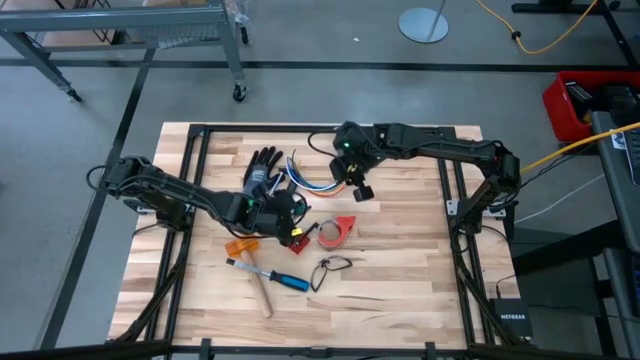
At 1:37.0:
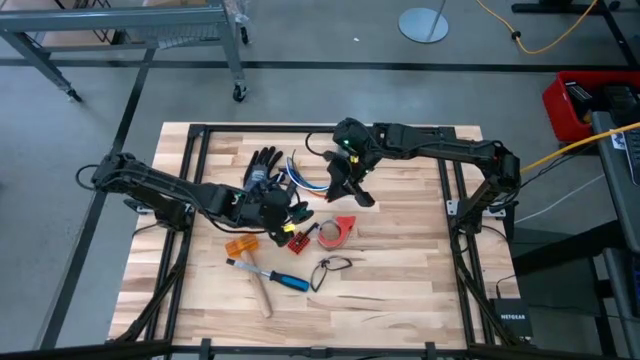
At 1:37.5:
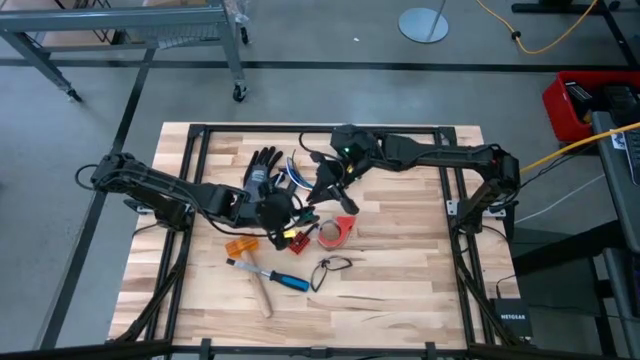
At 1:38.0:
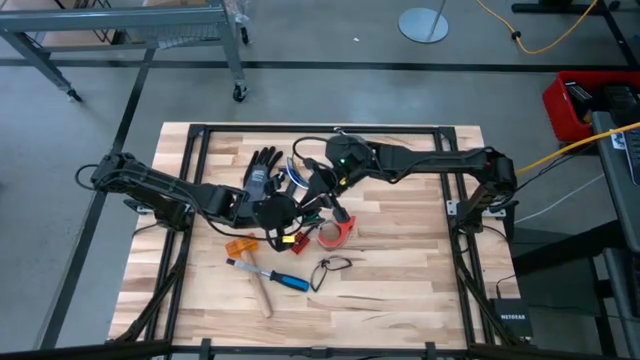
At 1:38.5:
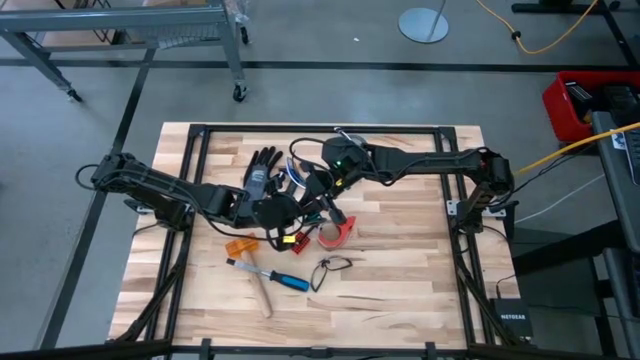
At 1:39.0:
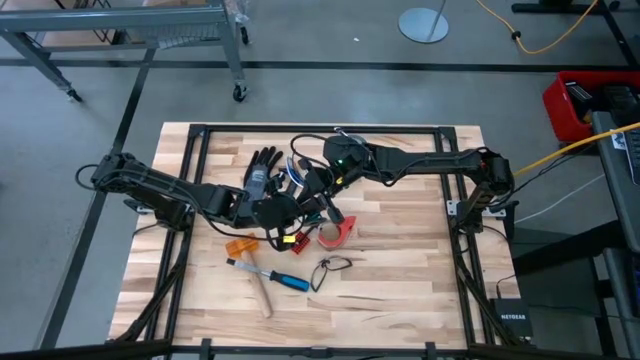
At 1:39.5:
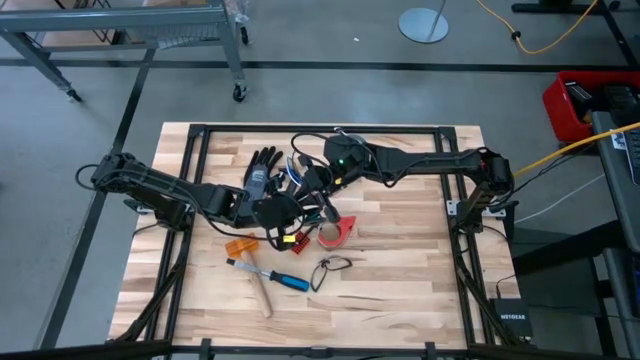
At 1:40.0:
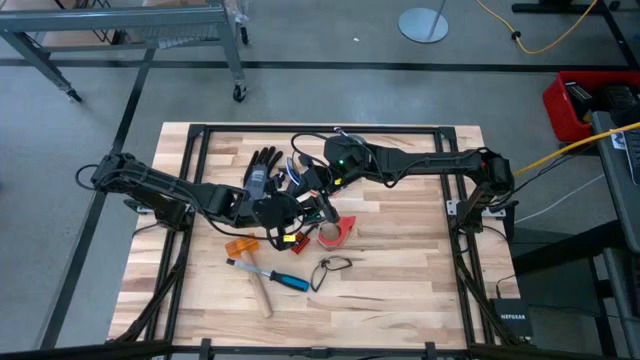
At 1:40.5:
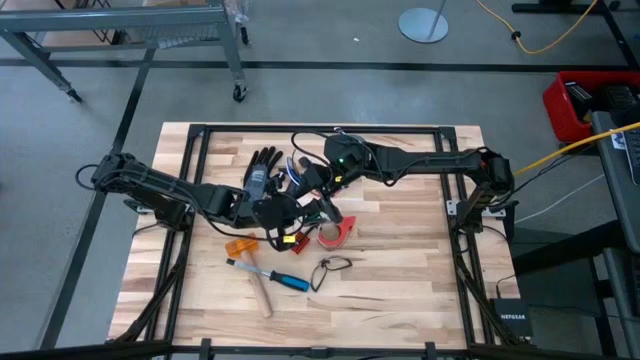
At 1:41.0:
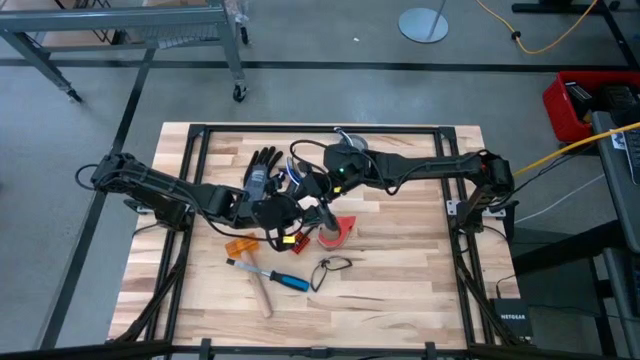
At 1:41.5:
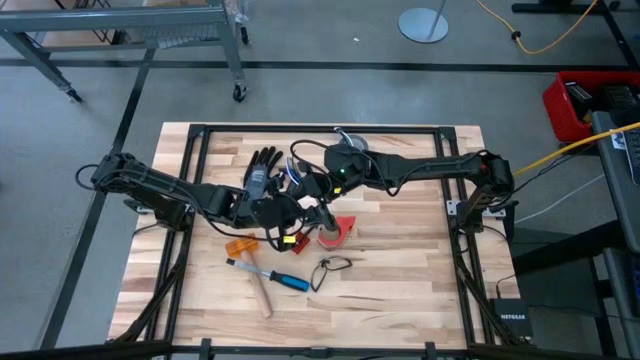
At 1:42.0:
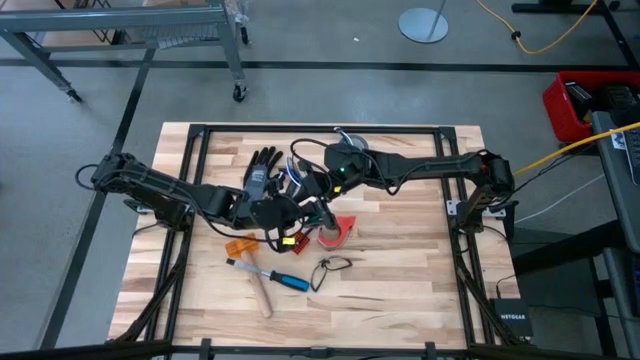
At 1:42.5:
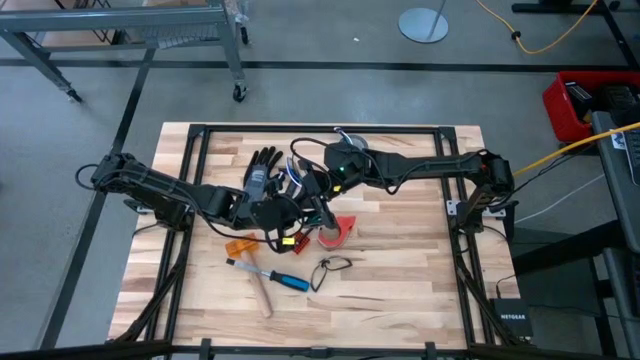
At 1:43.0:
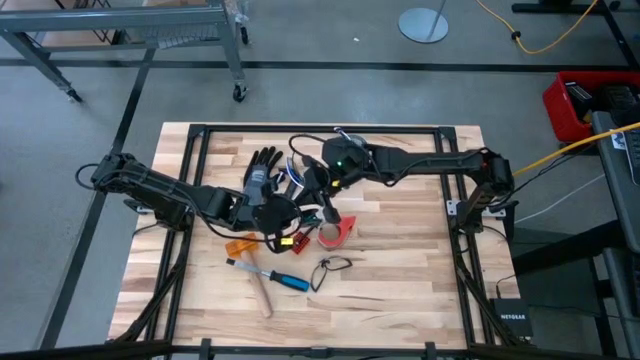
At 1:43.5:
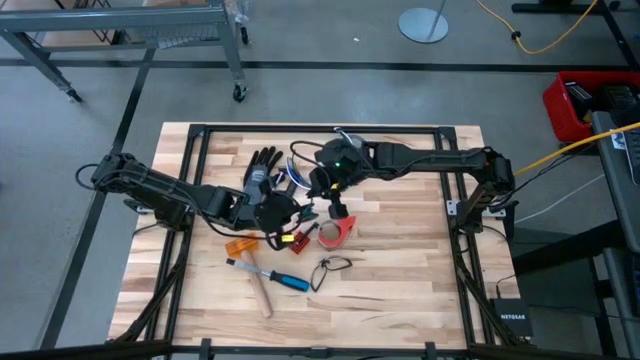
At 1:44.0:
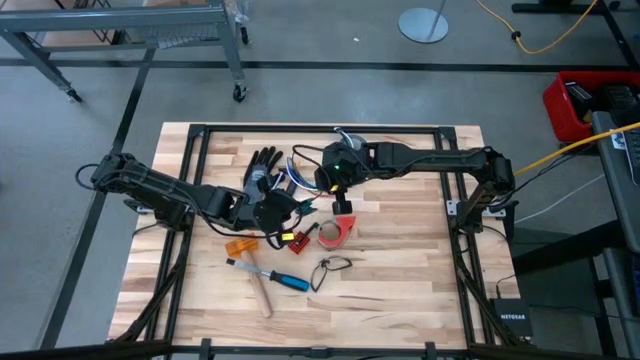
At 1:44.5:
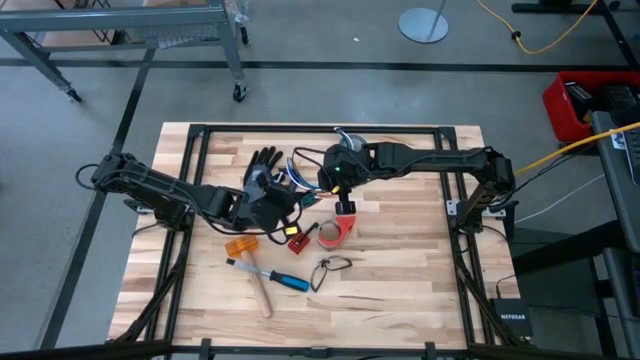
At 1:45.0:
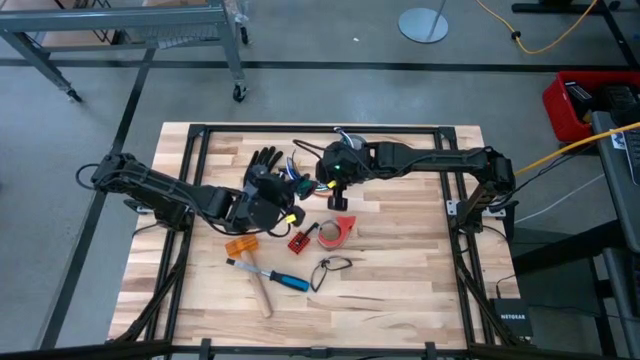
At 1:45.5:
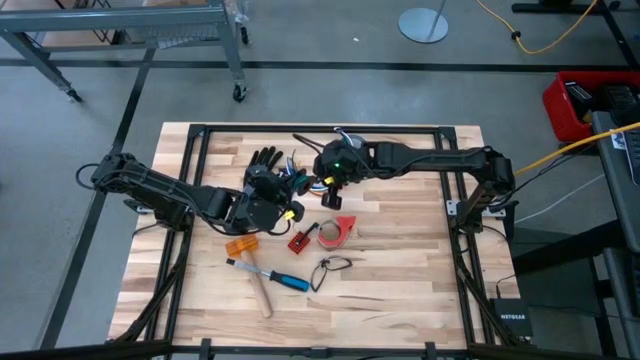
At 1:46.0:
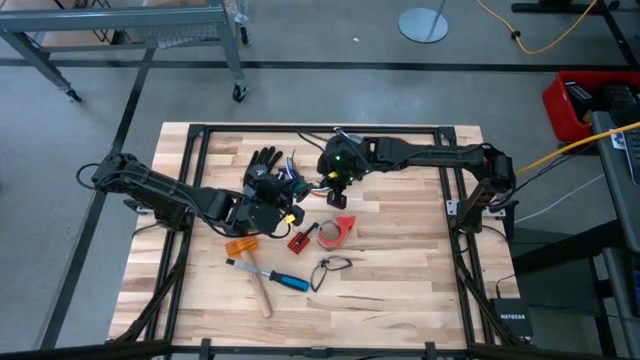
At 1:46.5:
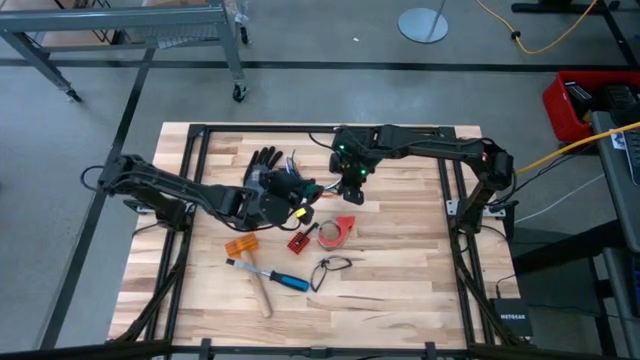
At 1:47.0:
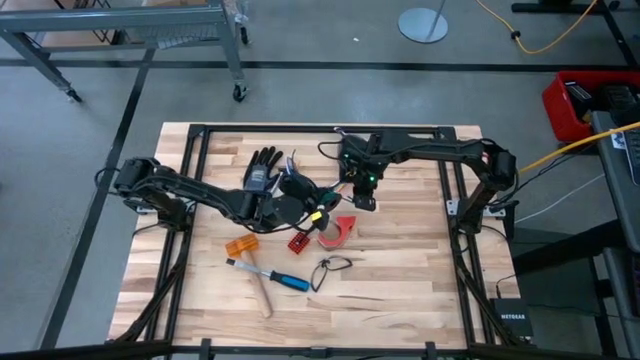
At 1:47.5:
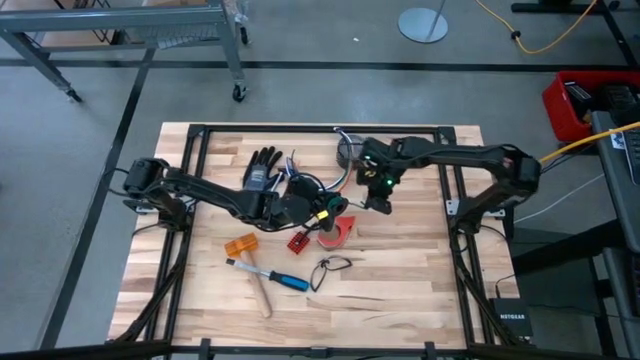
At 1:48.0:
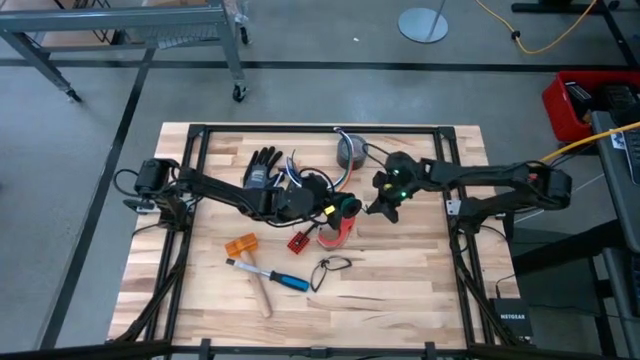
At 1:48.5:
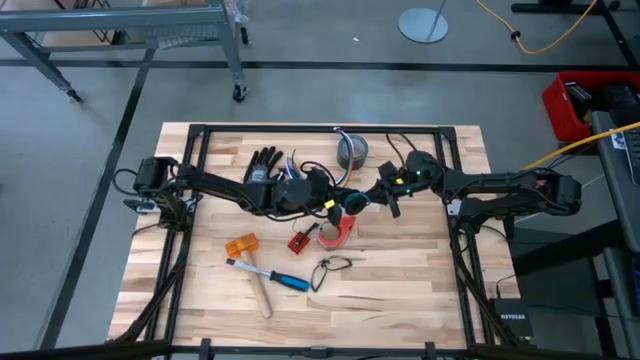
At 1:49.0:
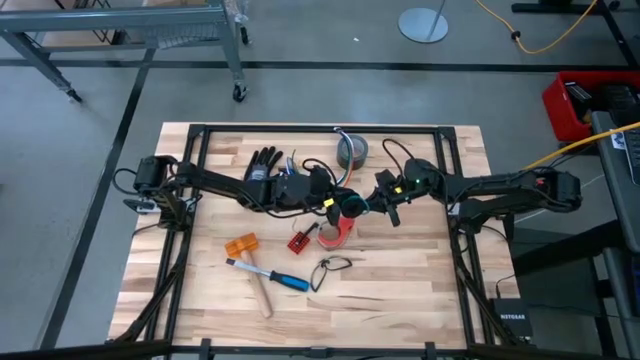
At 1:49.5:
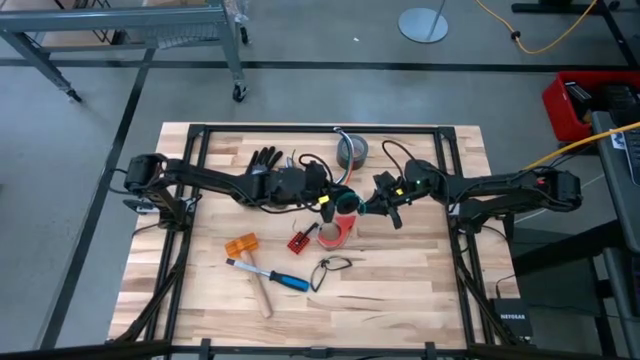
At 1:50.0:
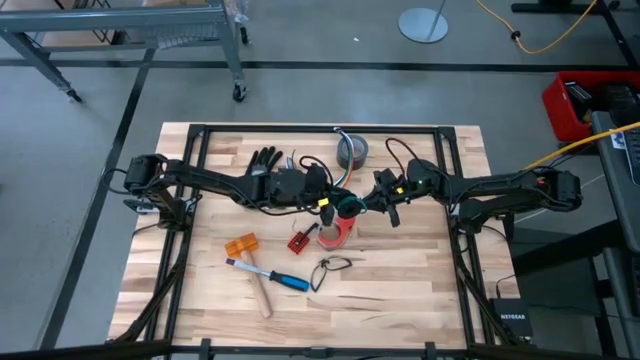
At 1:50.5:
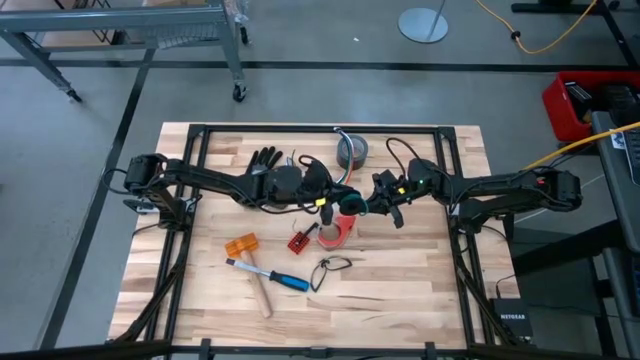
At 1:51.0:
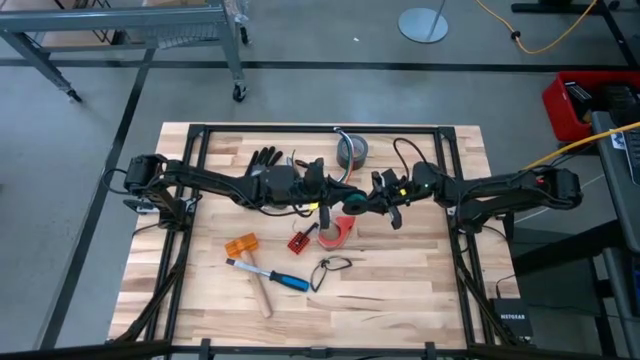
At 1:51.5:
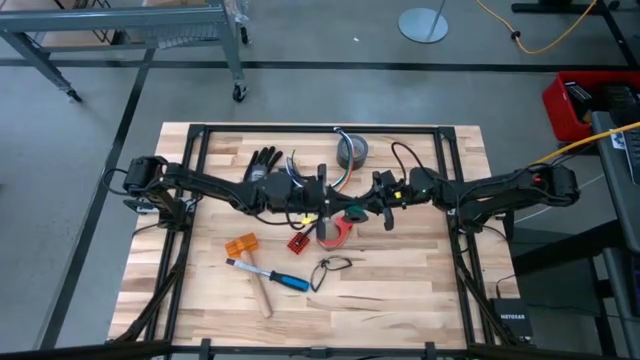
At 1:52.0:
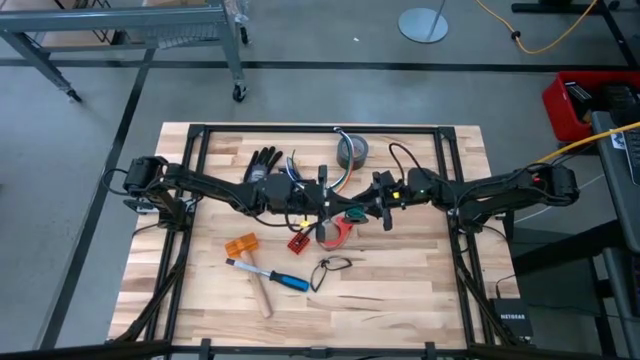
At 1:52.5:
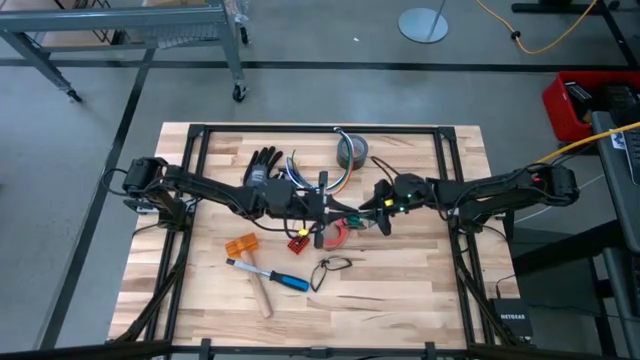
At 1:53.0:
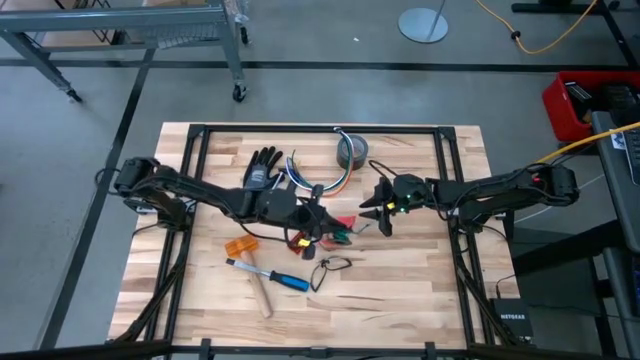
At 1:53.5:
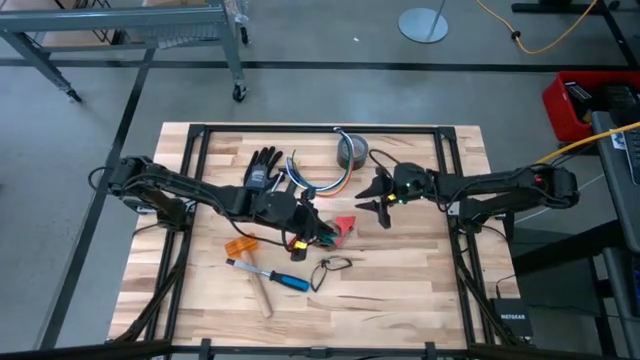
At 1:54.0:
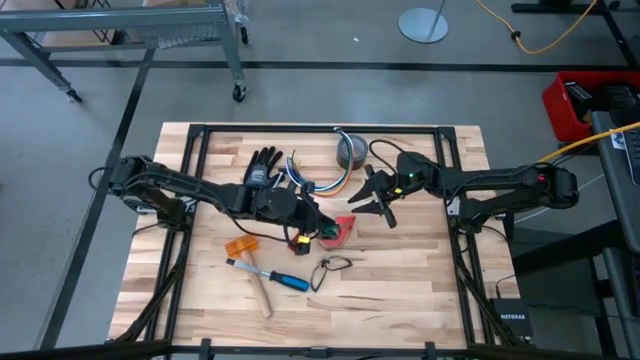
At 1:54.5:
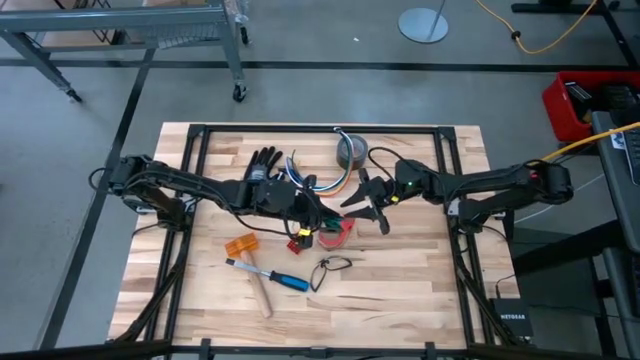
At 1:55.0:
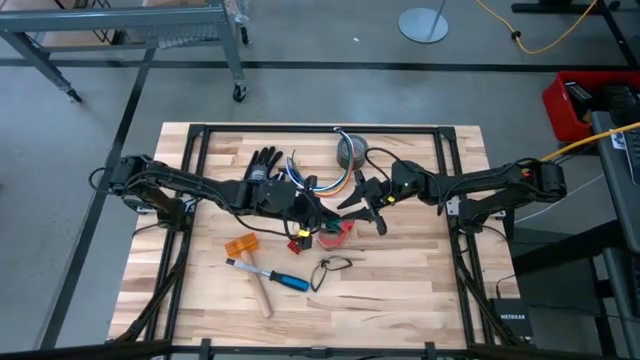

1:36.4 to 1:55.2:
Task: Coil cords
Coil the wire onto the spool
